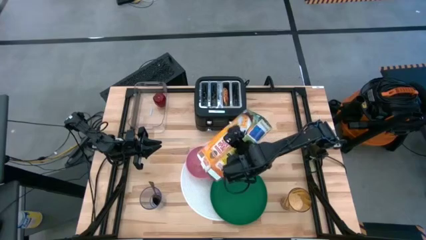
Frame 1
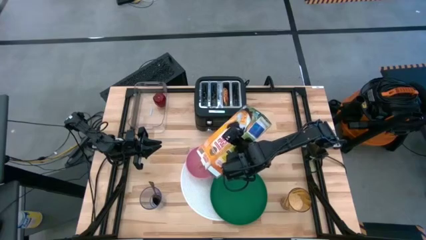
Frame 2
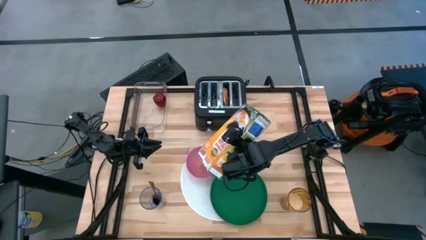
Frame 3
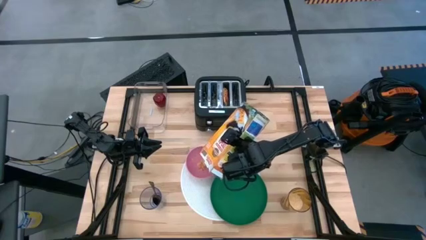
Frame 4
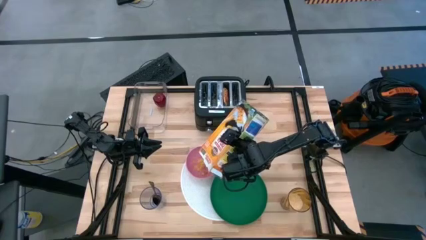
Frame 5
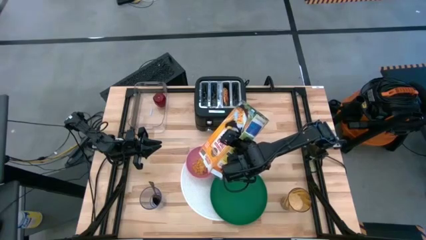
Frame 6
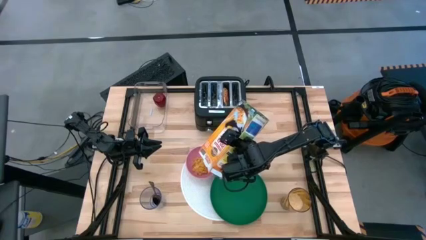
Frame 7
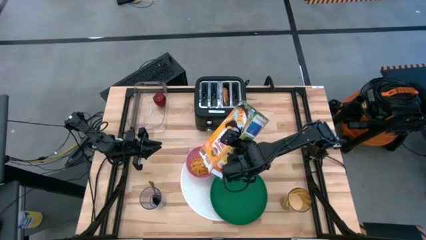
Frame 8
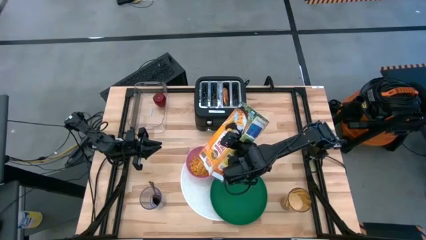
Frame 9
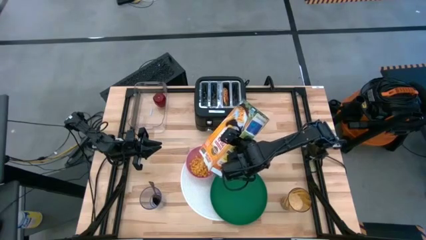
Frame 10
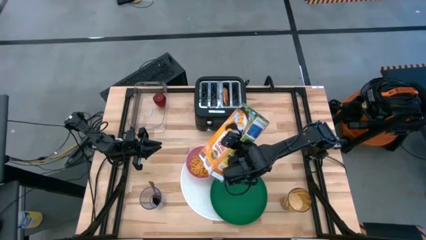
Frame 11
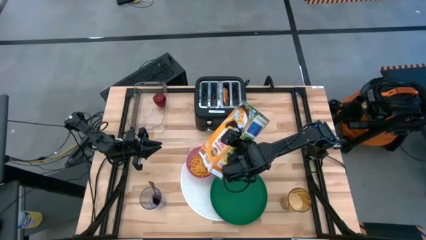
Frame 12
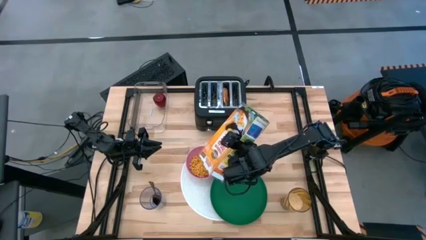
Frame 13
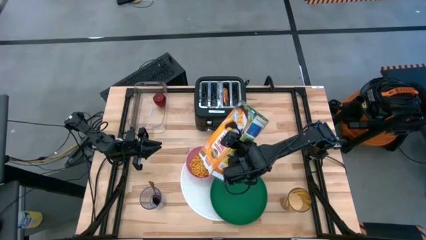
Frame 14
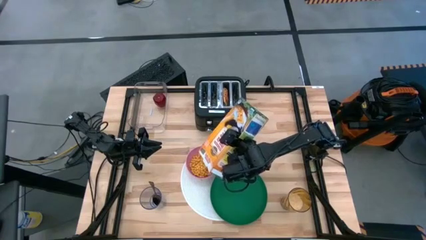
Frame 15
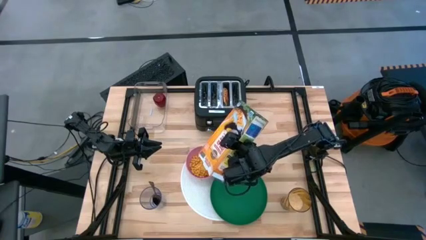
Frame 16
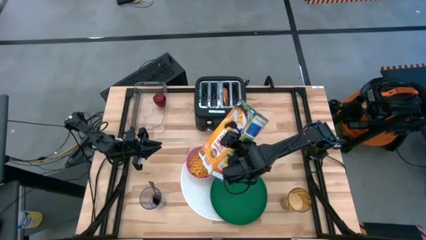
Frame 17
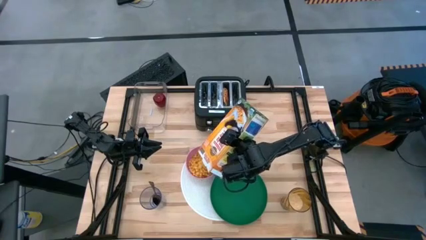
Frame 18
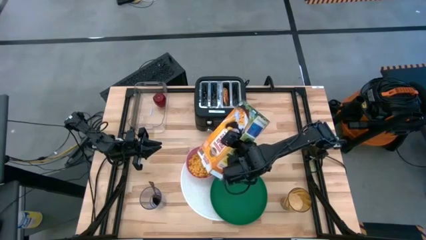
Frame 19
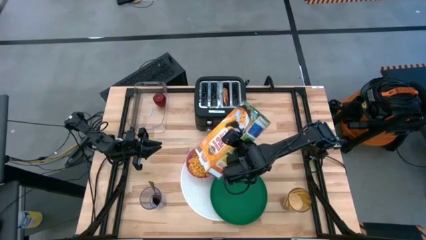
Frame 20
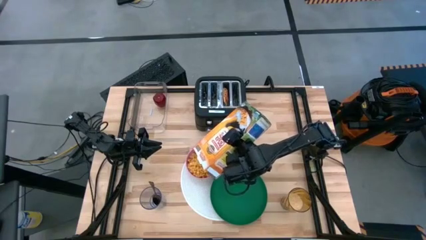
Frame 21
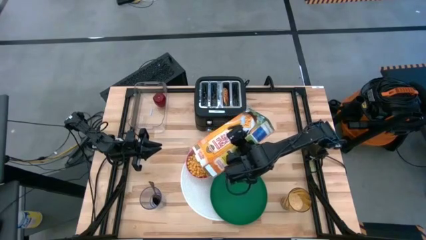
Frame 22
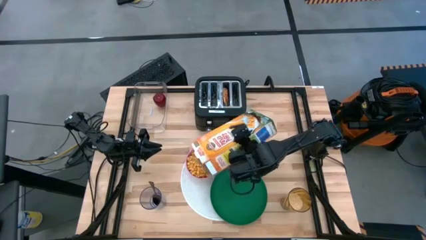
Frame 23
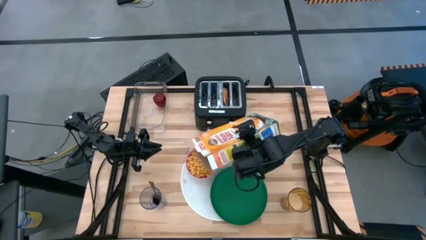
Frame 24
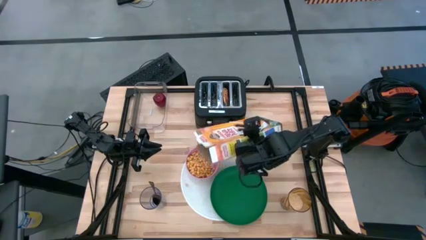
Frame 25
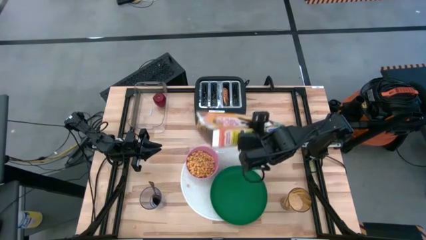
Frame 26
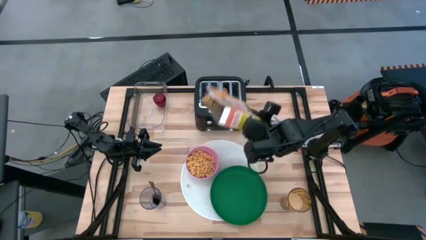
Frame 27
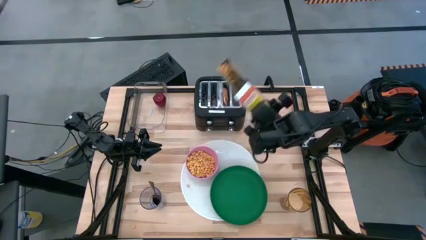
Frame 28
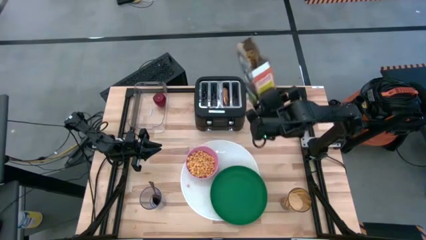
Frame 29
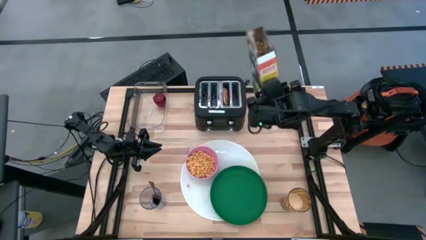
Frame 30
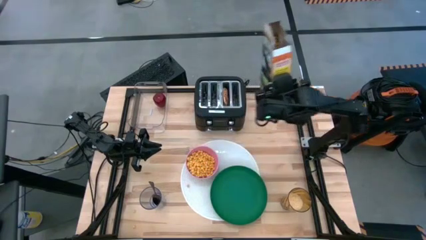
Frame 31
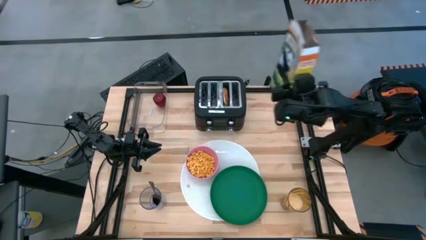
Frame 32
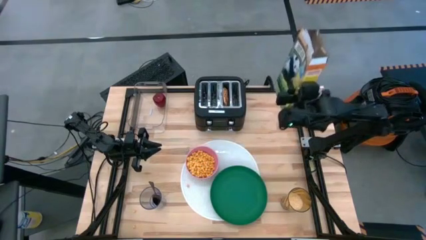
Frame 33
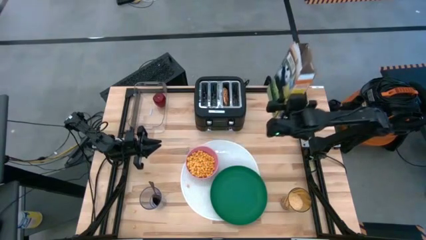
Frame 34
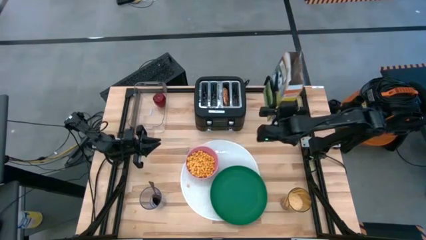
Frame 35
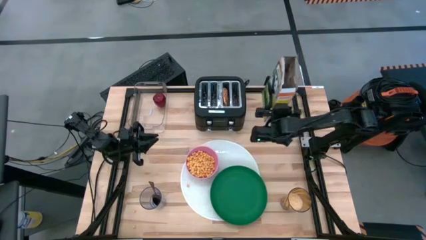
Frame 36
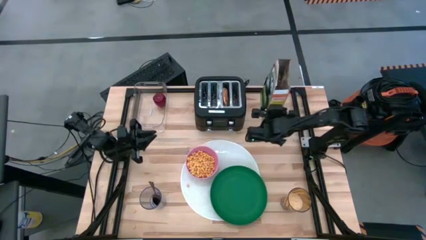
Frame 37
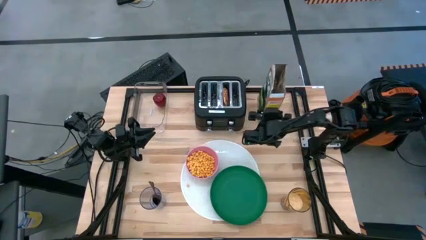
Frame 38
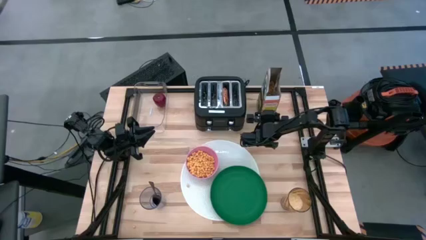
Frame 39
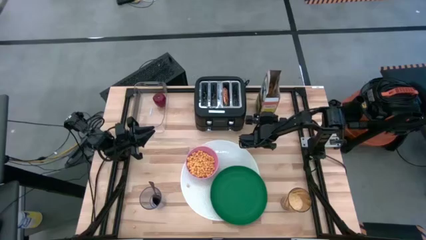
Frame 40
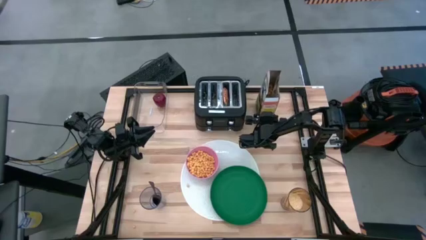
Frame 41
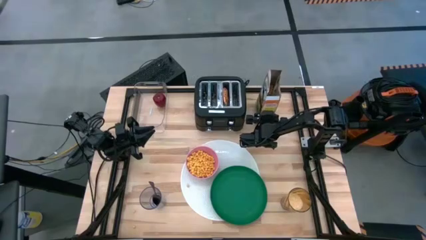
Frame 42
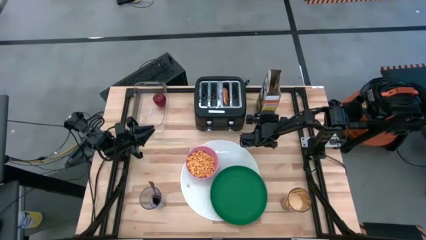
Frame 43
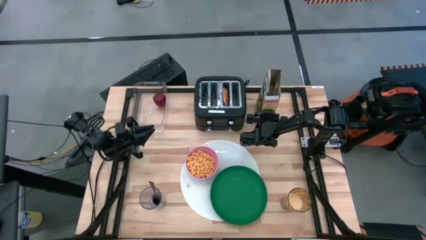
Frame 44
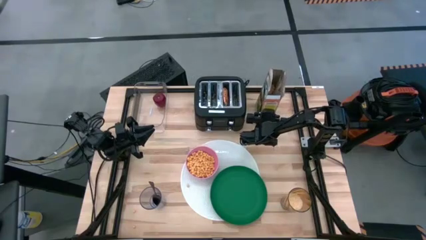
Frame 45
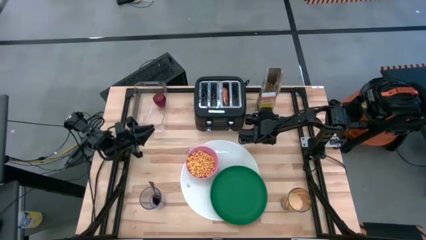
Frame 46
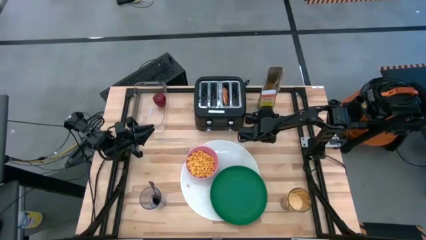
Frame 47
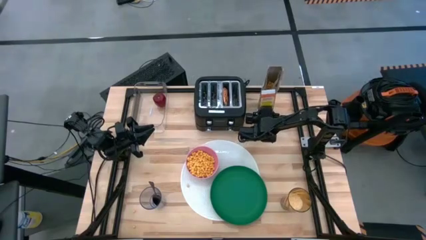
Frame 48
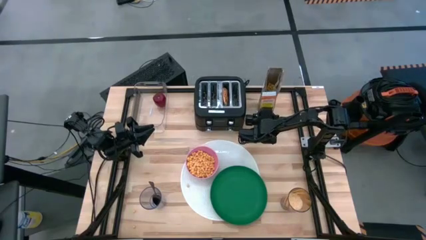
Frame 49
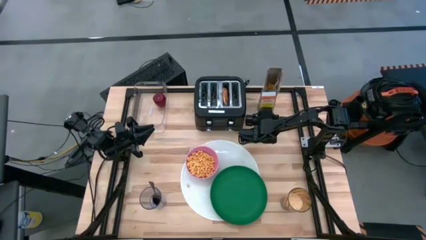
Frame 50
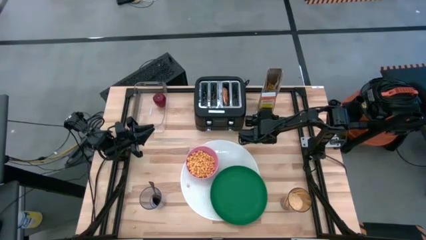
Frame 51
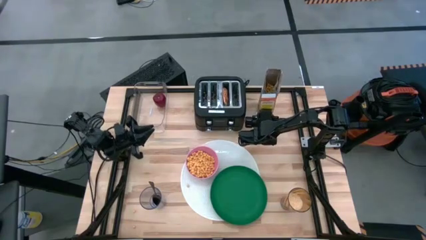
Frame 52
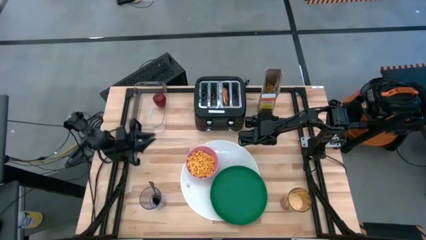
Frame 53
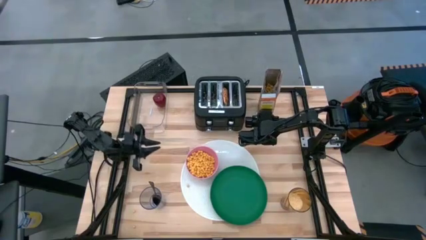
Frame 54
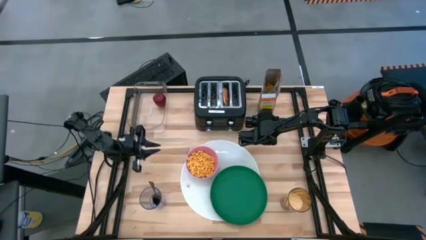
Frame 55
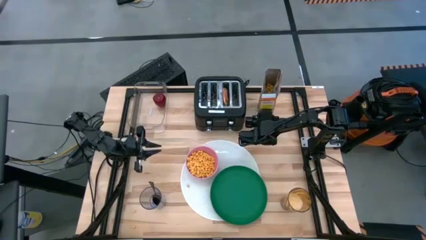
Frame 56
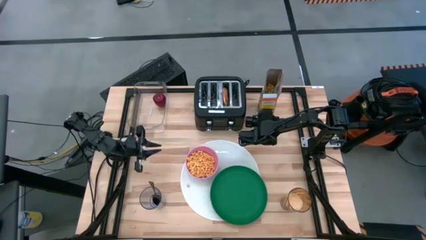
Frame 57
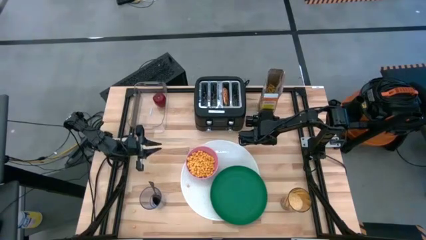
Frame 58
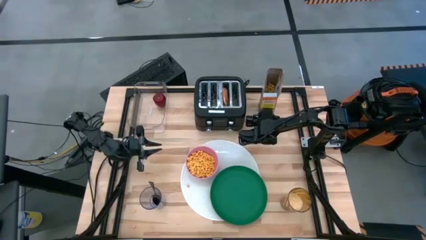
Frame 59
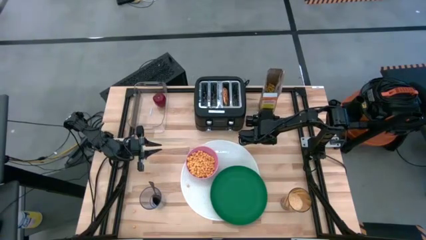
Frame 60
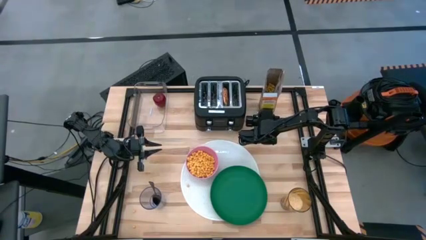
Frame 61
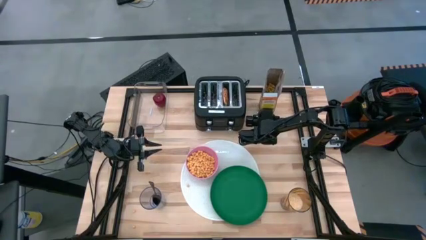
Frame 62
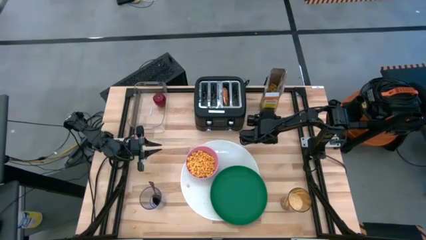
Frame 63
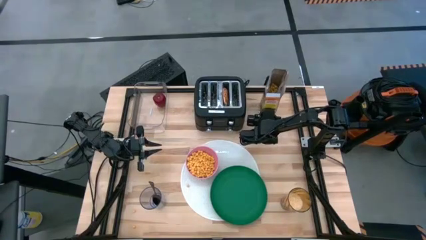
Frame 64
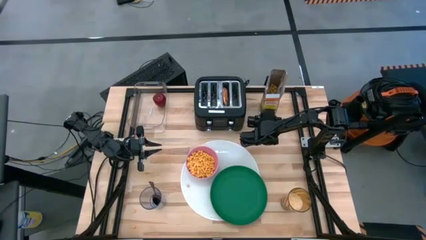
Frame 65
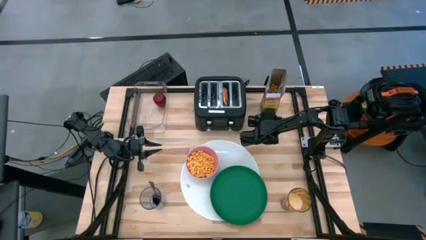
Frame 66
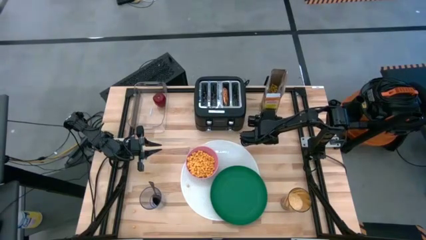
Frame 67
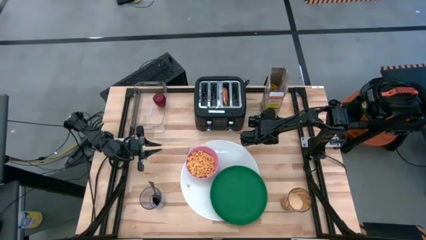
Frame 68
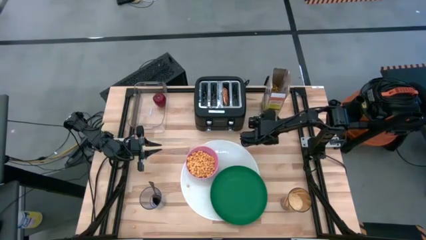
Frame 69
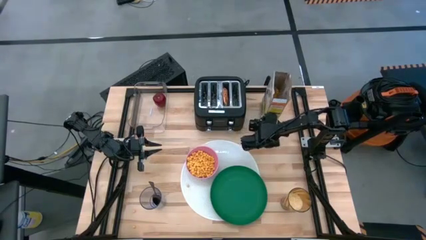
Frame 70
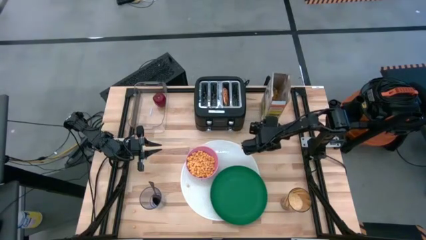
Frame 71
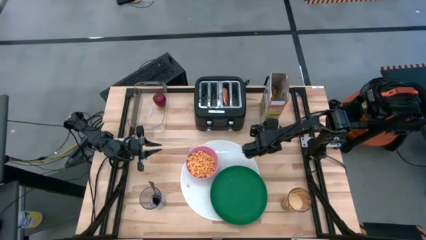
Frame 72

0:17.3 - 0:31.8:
Task: Arrange a breakfast setting
Pour the cereal into the pink bowl
